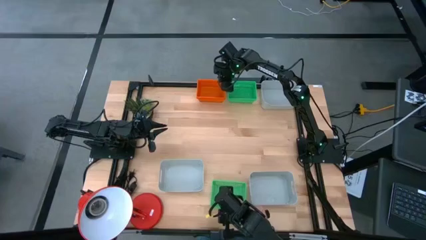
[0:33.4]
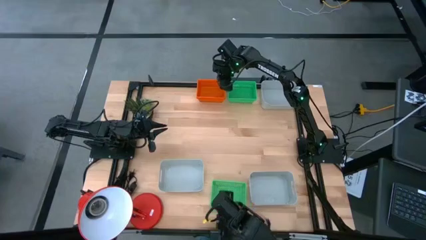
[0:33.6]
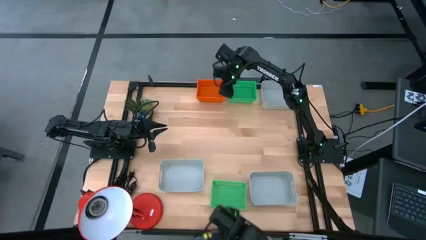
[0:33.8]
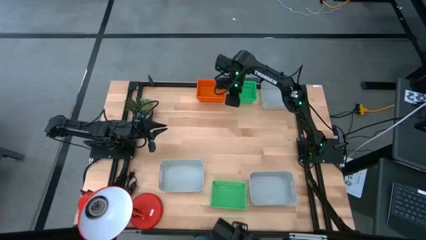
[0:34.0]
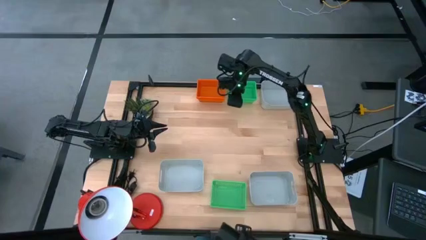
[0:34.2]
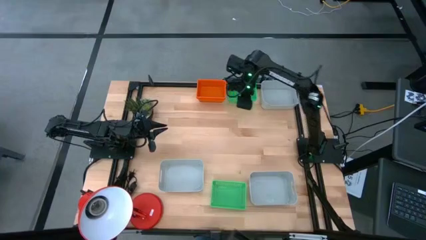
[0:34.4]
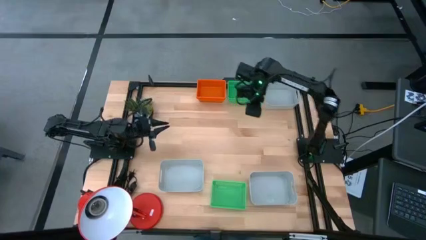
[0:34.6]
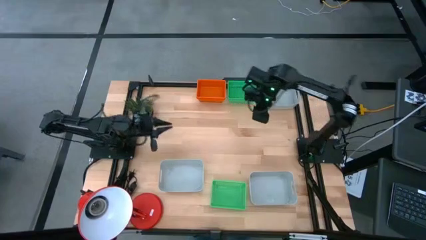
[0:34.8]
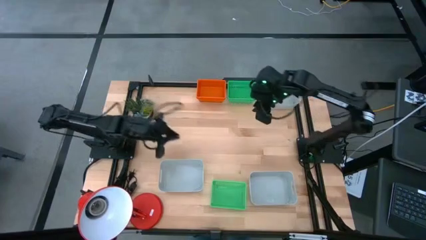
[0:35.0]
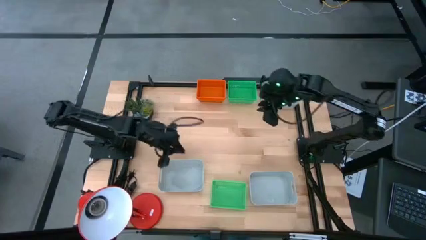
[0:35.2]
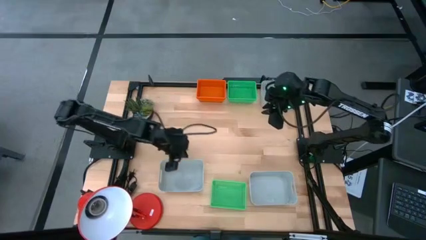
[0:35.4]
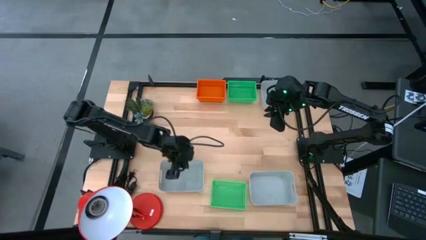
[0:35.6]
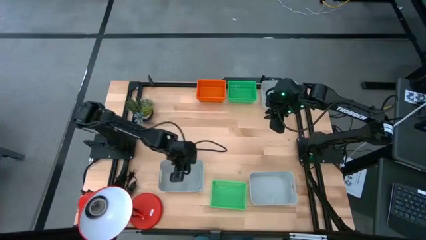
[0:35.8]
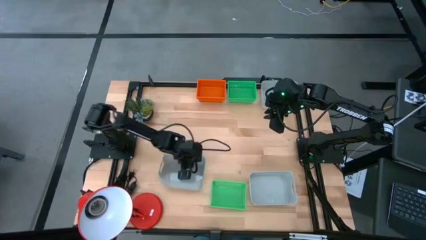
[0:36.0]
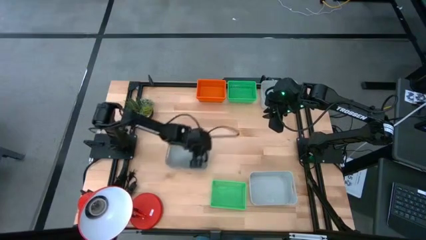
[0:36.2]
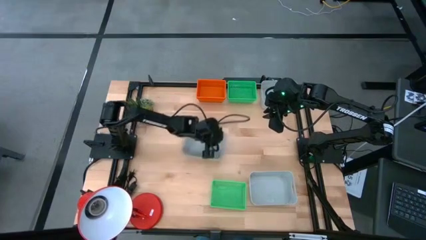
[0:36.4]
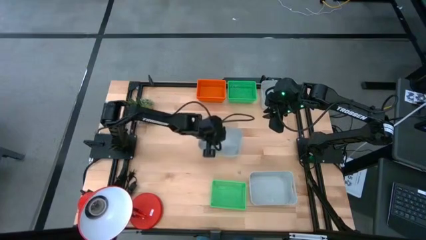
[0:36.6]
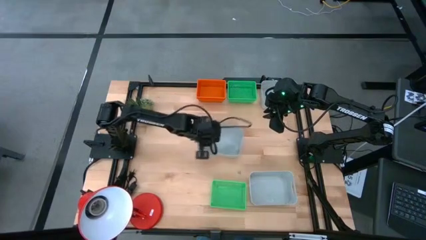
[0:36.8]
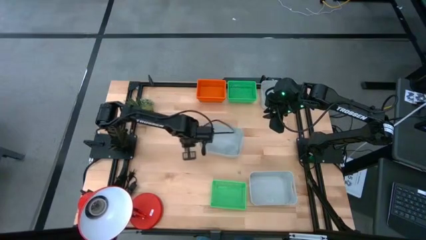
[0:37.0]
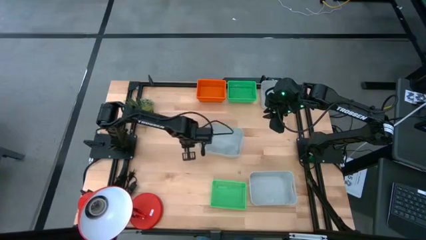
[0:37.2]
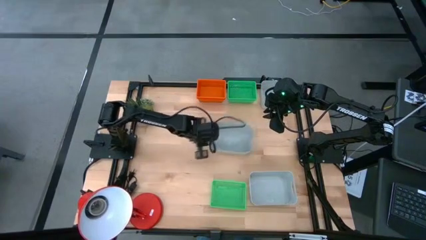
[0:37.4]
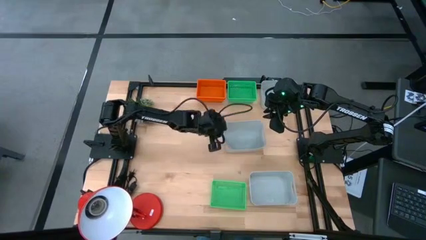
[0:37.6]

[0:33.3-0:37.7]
Move the bottom left gray bin to the center of the table

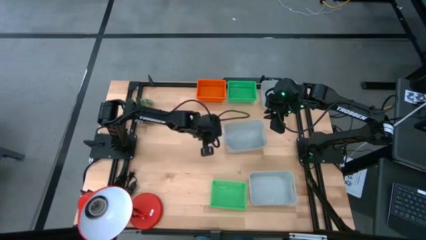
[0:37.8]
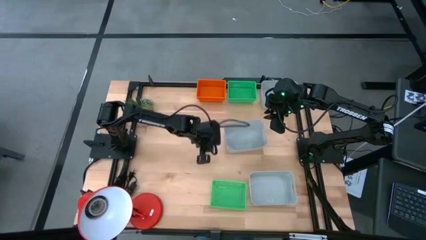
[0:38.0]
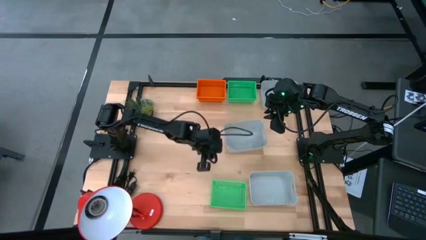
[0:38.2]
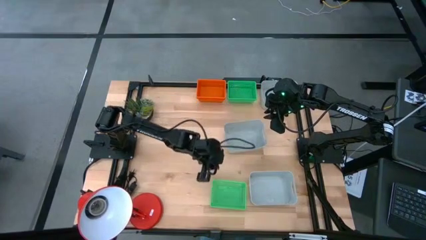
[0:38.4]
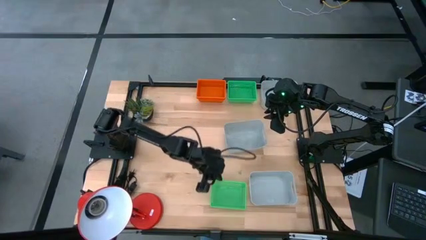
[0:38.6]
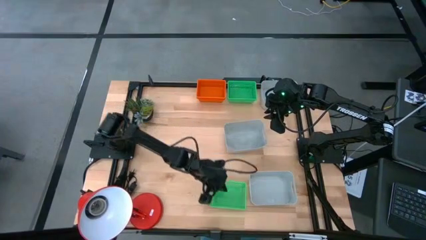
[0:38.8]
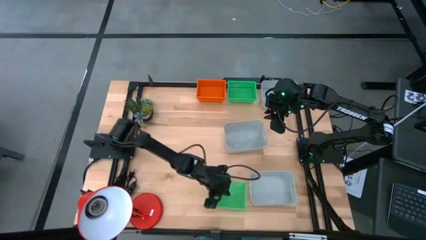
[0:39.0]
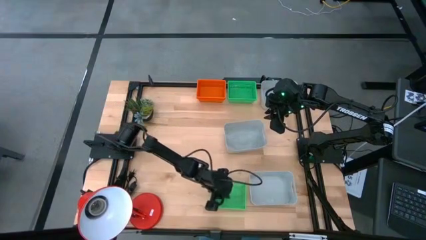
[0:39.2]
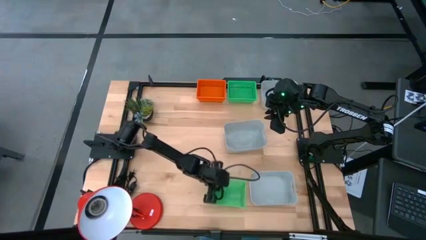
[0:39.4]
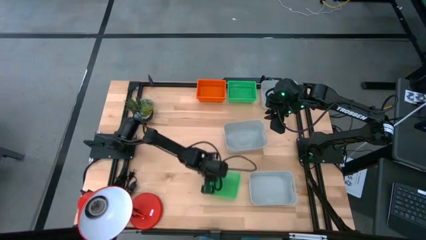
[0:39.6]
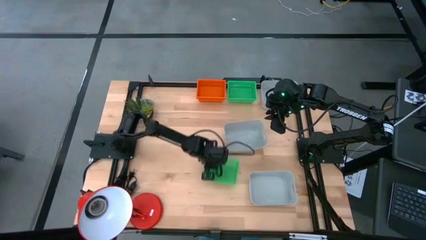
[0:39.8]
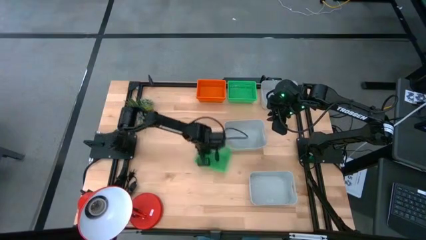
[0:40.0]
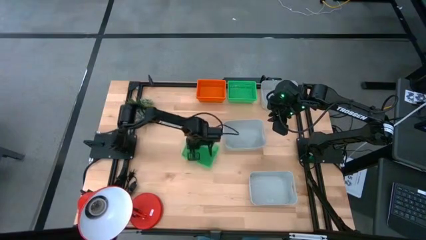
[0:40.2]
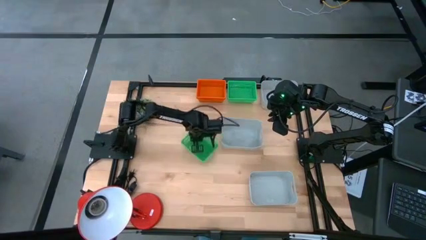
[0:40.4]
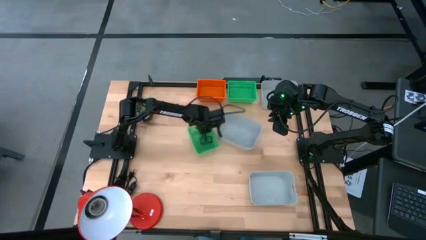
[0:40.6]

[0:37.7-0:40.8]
Move the bottom green bin to the center of the table

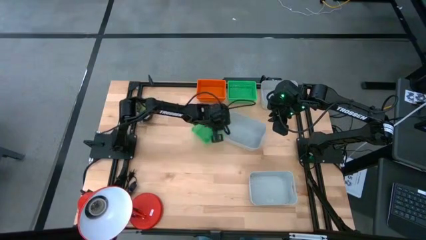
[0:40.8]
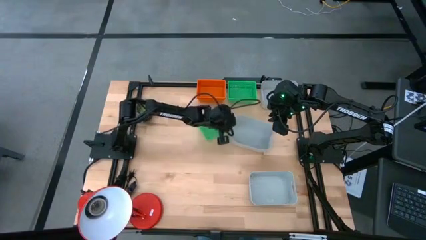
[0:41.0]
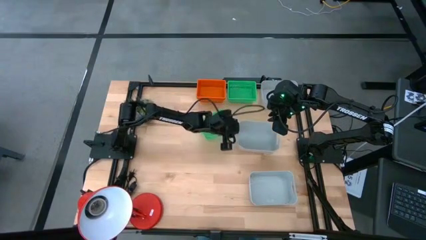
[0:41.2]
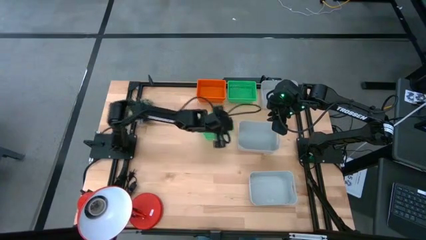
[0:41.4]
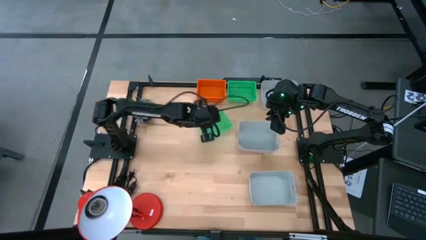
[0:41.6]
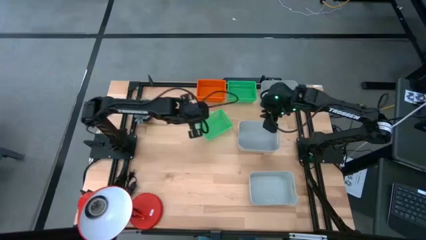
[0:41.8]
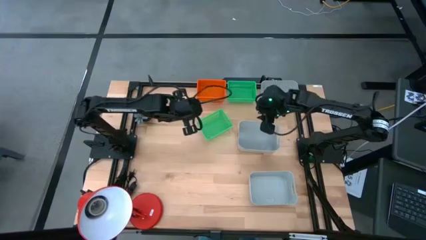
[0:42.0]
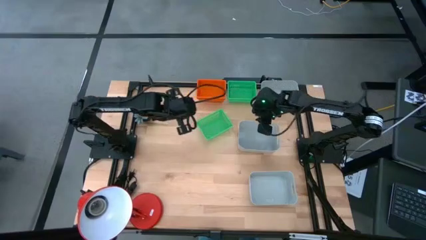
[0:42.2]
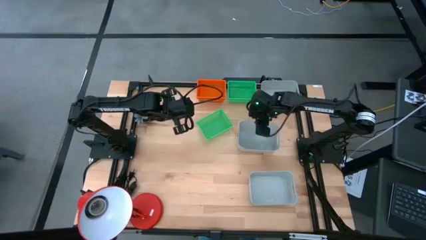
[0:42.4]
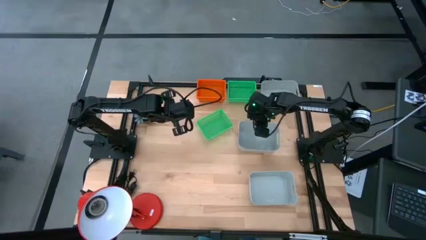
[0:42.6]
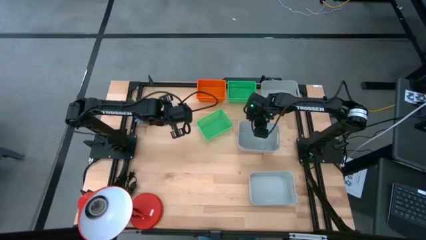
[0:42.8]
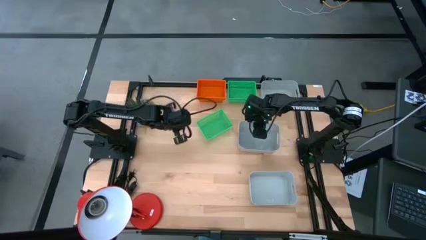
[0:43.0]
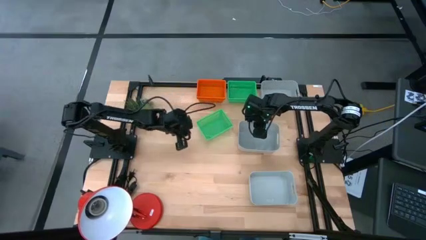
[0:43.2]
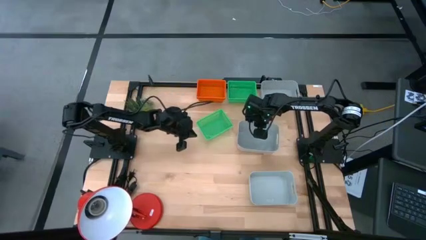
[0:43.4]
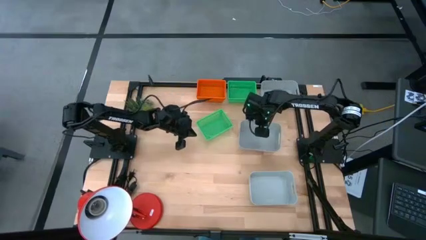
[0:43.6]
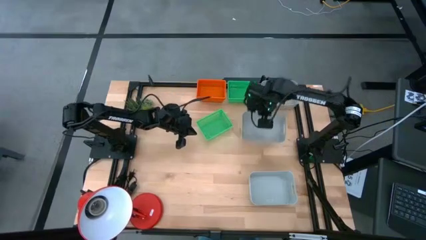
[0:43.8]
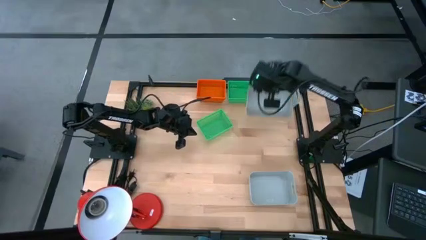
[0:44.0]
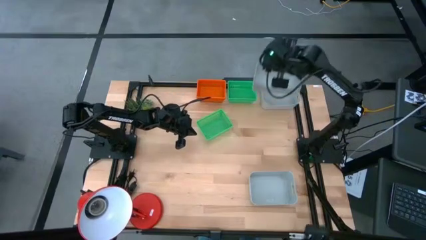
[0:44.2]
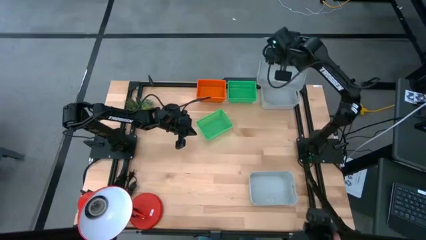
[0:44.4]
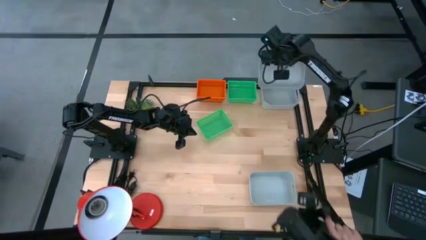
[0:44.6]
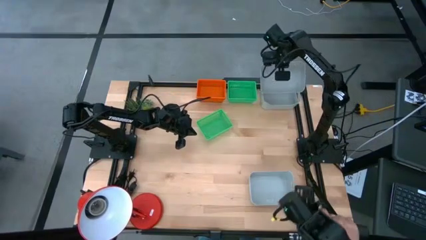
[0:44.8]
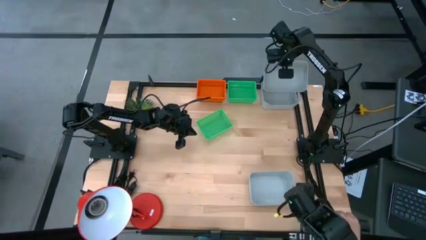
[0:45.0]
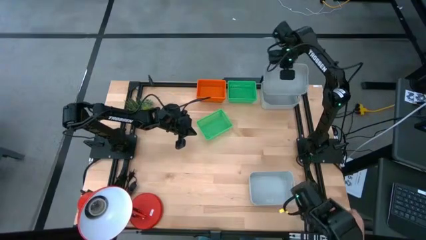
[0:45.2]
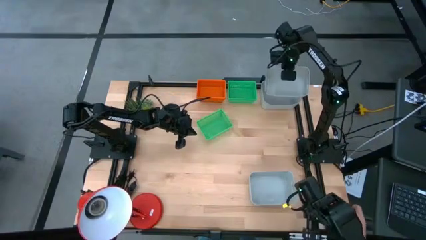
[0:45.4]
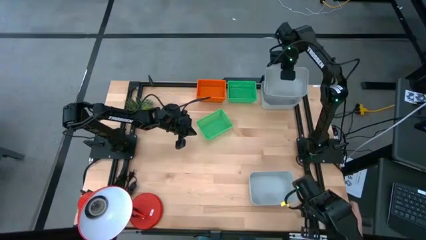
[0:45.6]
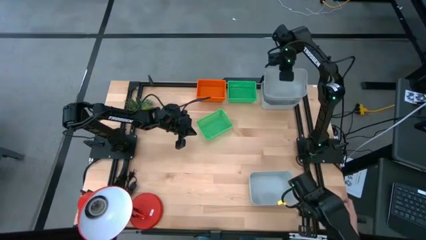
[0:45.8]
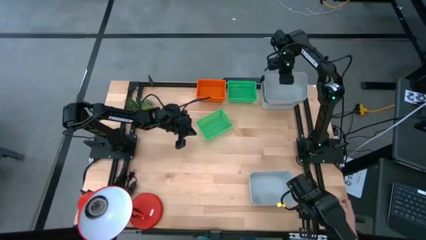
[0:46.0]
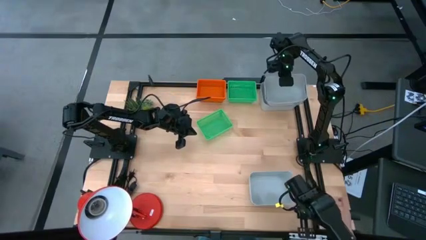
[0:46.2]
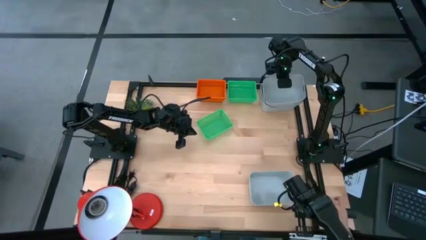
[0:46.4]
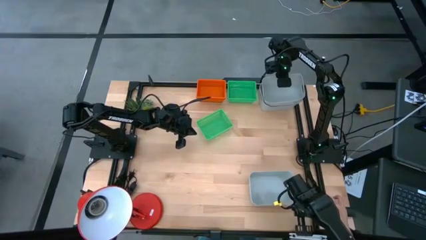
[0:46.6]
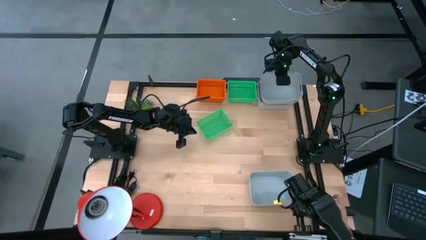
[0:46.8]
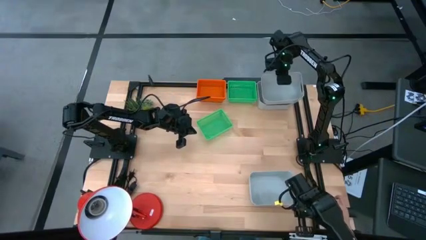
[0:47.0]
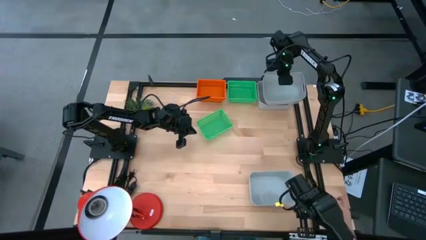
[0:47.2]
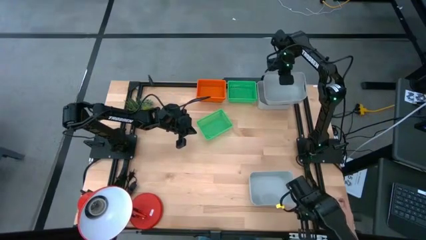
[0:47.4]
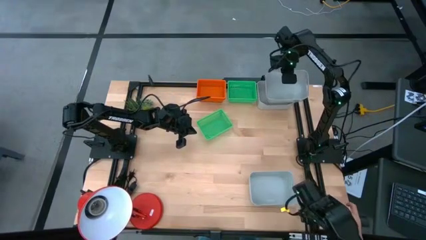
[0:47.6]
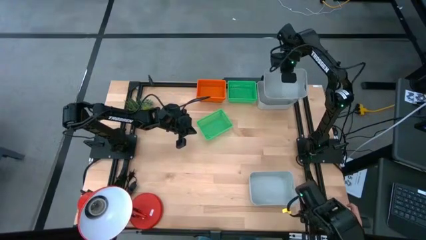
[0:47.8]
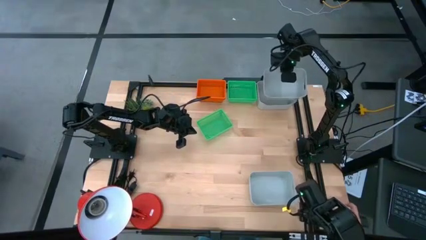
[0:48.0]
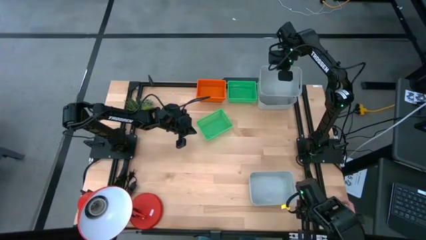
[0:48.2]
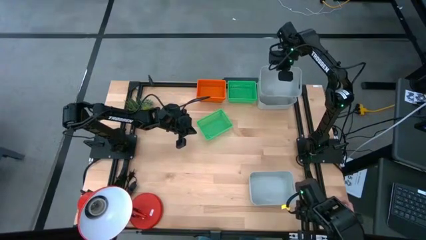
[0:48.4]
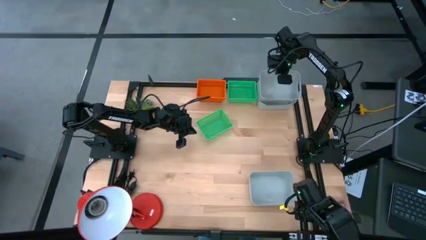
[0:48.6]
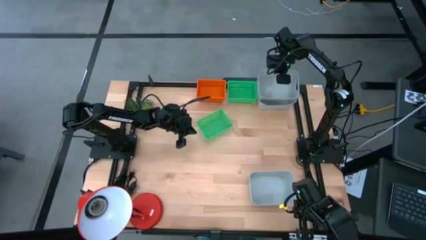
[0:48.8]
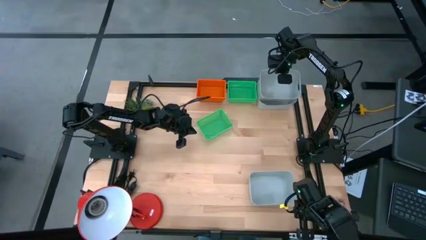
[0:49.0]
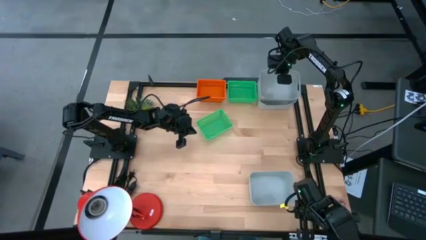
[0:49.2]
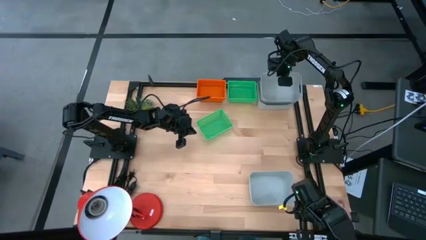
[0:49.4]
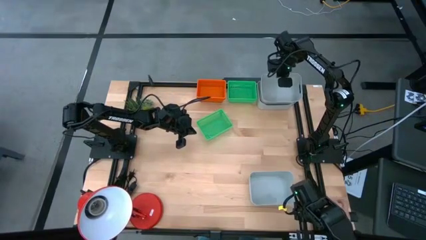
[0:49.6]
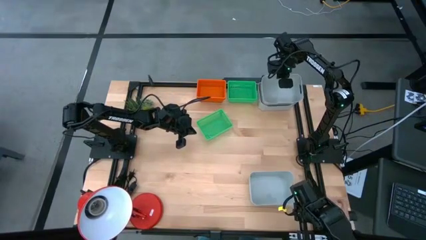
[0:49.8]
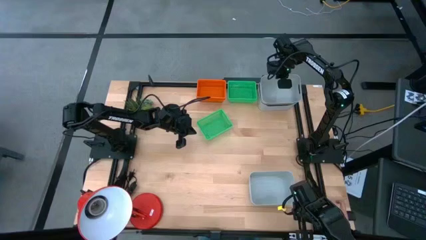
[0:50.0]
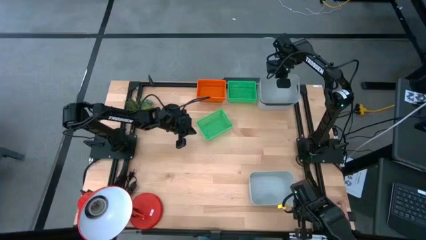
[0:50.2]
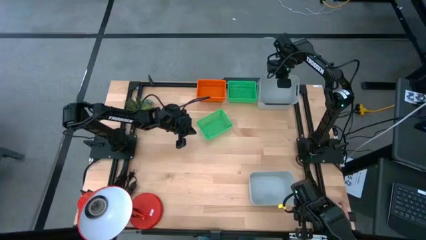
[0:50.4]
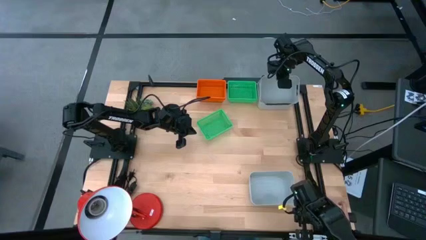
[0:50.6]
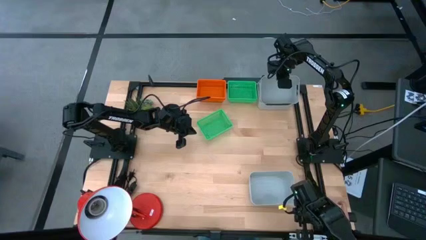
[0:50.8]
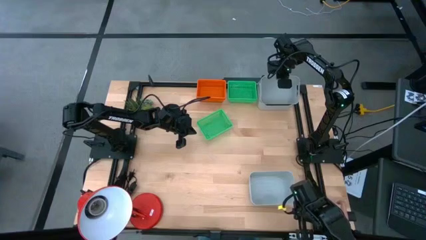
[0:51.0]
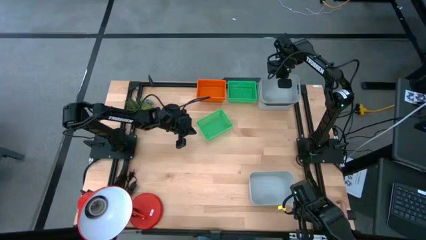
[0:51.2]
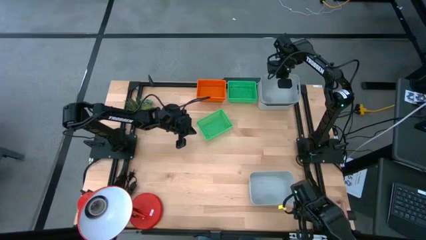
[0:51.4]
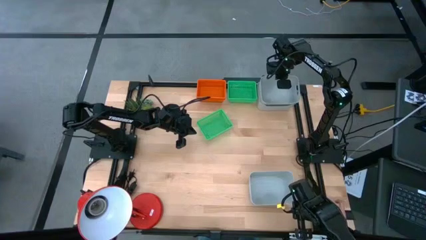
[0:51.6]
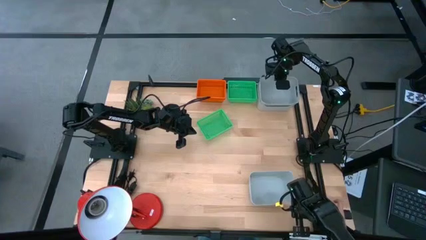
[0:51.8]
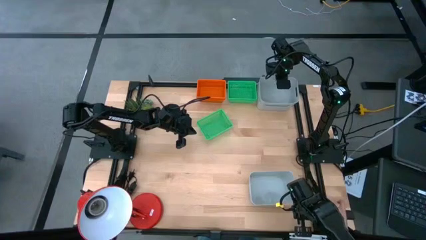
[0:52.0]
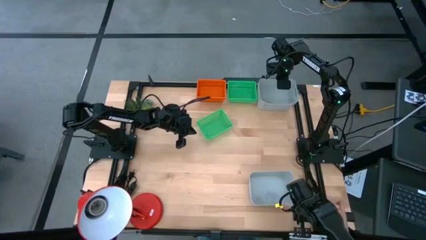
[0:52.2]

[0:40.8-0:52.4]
Stack the bottom left gray bin on the top gray bin
